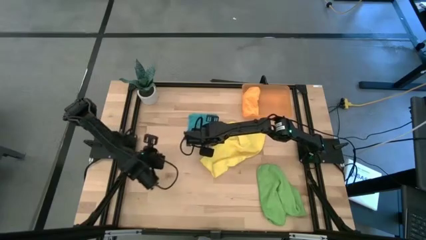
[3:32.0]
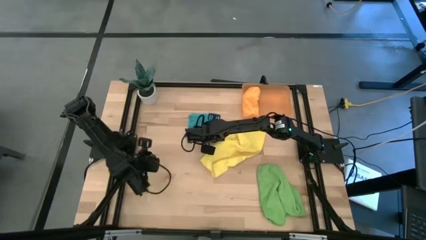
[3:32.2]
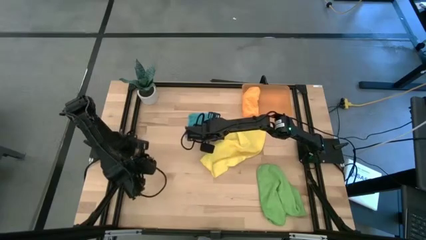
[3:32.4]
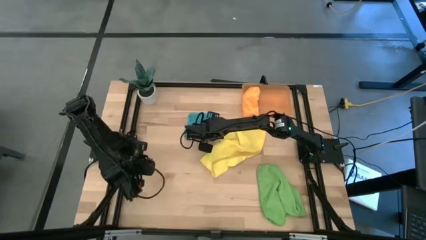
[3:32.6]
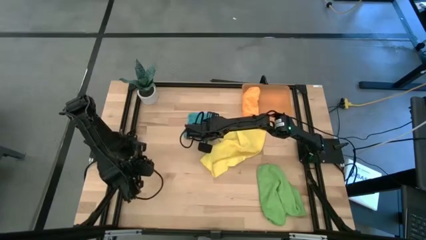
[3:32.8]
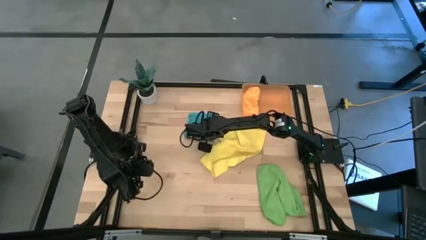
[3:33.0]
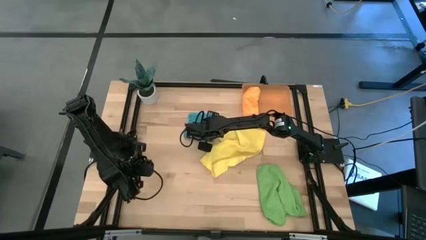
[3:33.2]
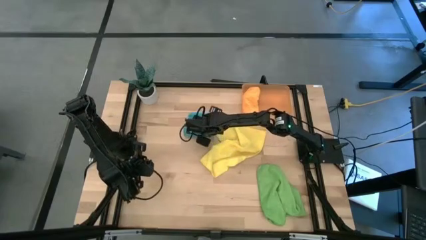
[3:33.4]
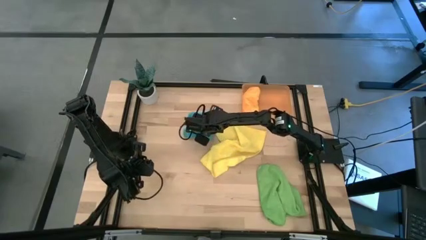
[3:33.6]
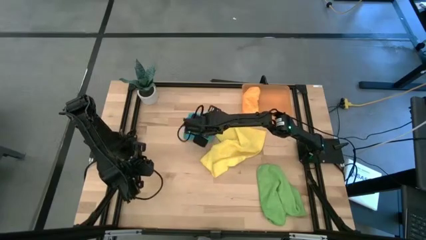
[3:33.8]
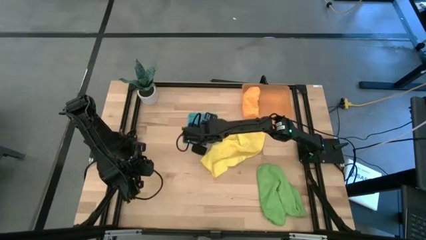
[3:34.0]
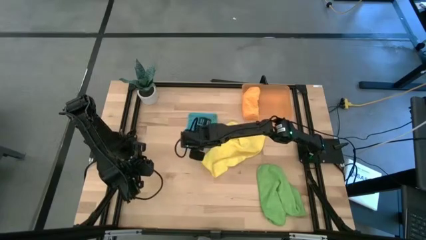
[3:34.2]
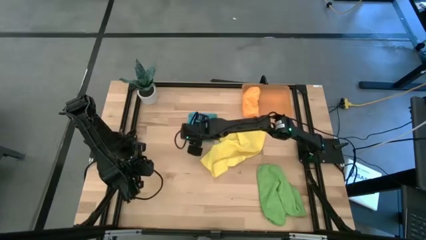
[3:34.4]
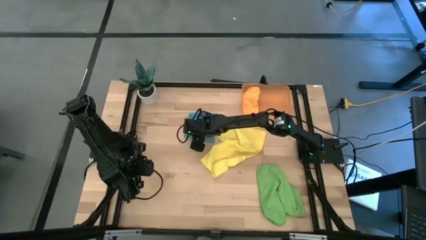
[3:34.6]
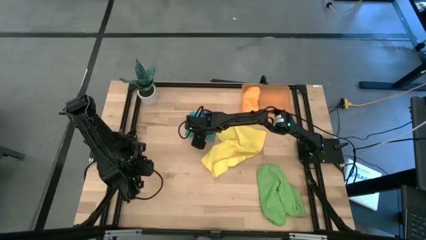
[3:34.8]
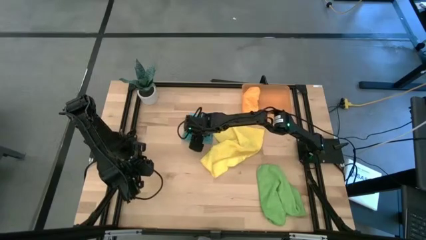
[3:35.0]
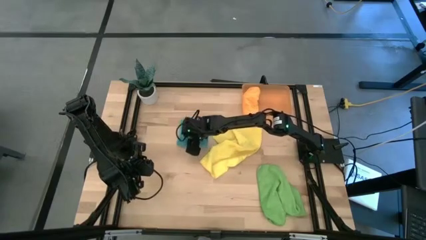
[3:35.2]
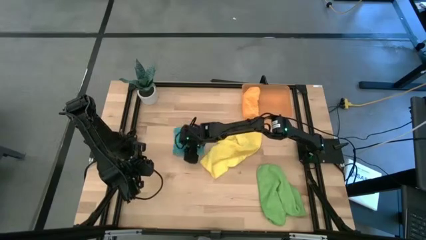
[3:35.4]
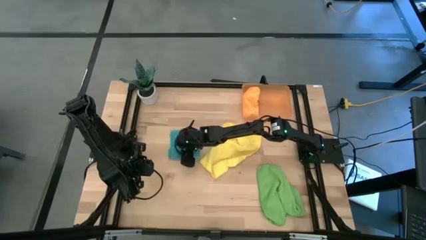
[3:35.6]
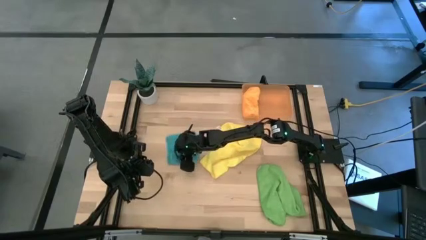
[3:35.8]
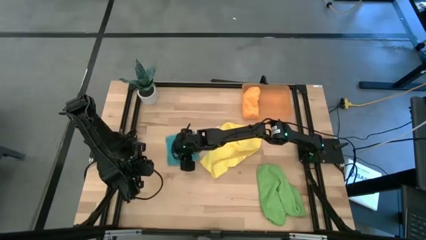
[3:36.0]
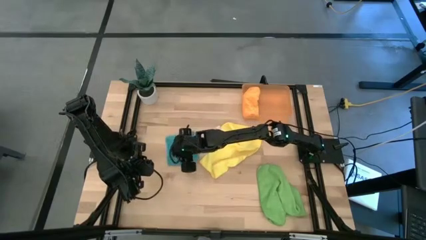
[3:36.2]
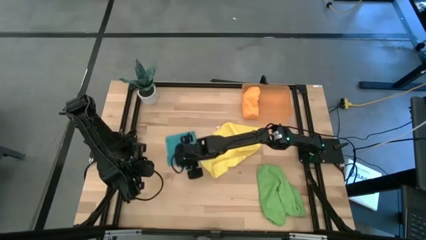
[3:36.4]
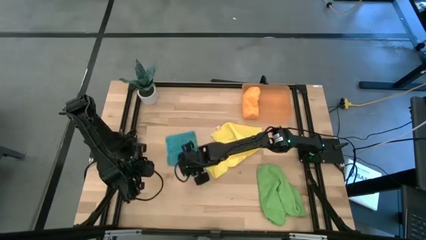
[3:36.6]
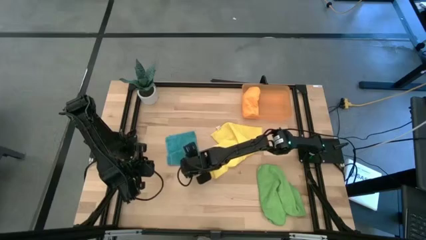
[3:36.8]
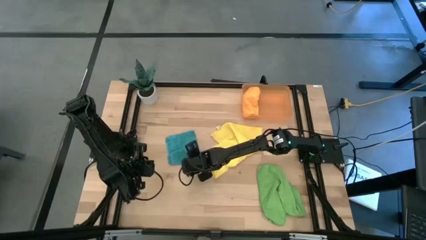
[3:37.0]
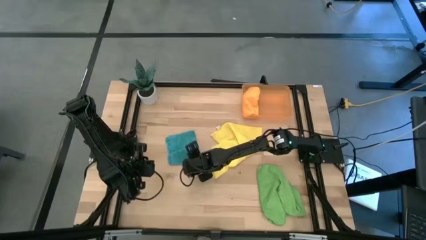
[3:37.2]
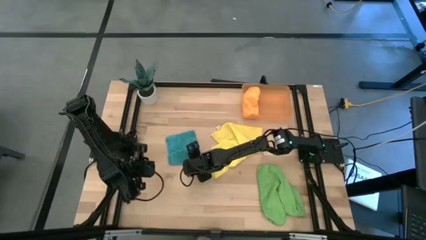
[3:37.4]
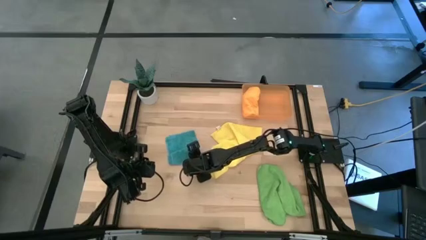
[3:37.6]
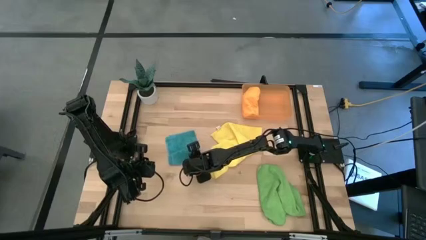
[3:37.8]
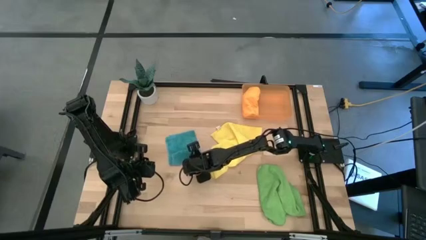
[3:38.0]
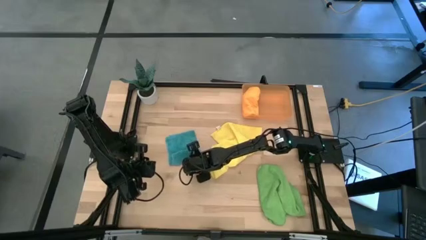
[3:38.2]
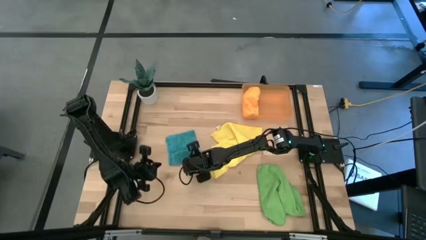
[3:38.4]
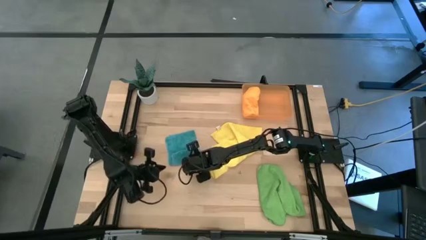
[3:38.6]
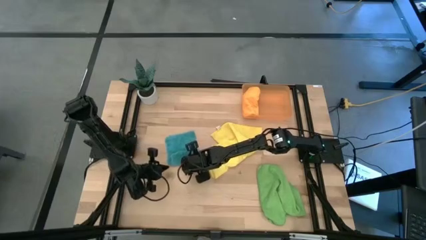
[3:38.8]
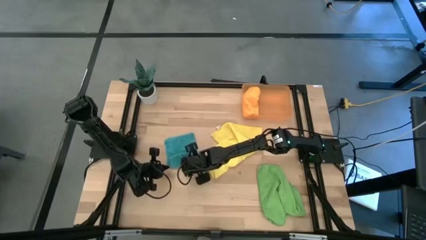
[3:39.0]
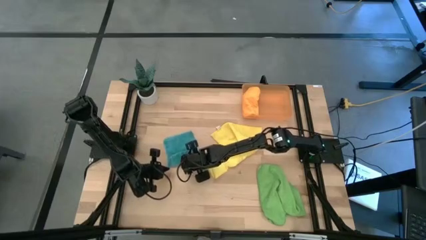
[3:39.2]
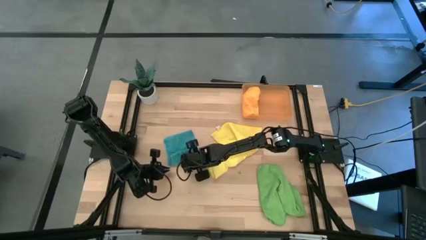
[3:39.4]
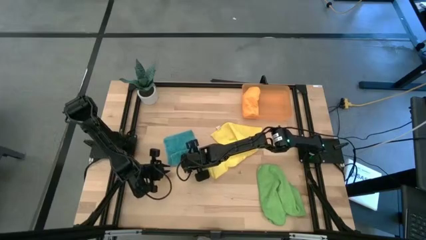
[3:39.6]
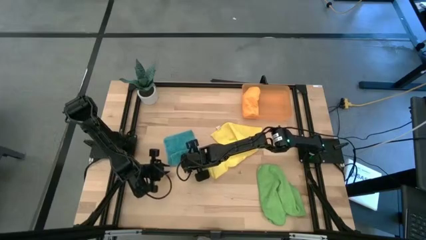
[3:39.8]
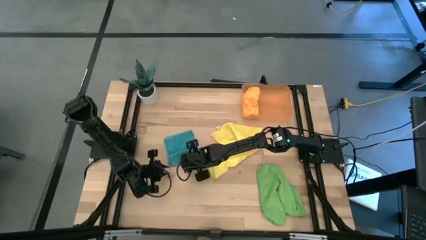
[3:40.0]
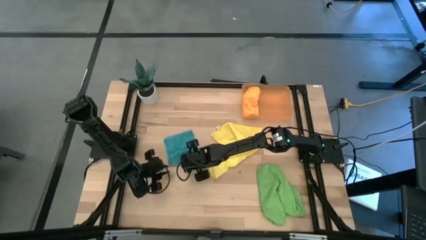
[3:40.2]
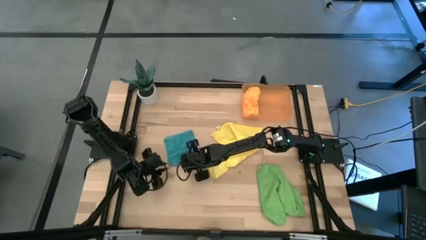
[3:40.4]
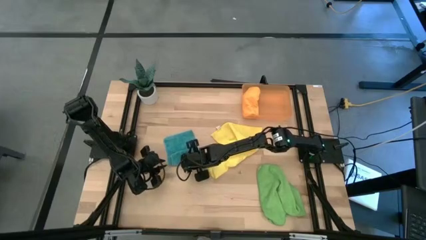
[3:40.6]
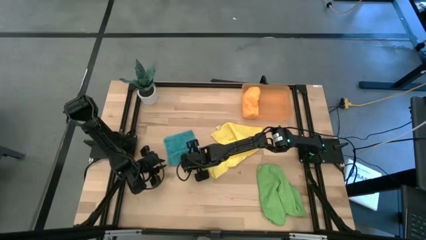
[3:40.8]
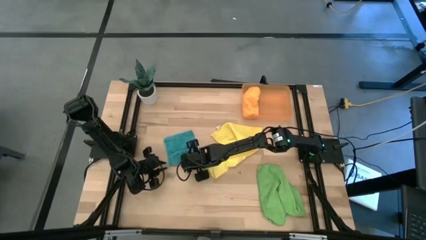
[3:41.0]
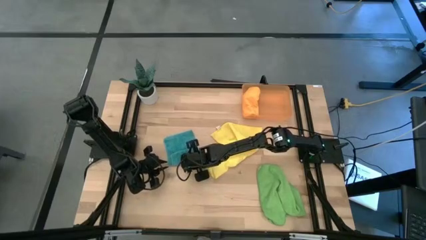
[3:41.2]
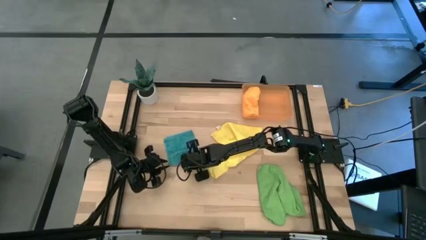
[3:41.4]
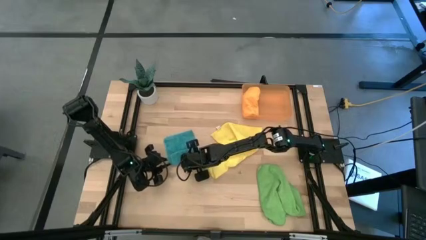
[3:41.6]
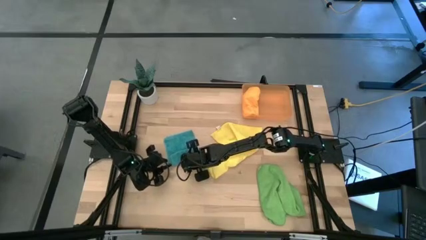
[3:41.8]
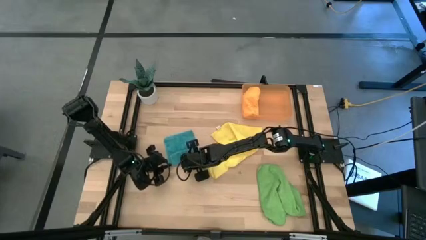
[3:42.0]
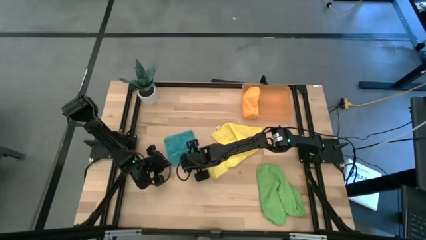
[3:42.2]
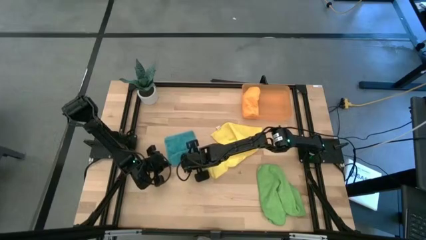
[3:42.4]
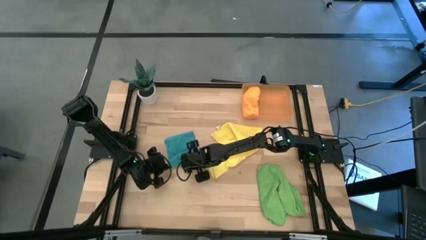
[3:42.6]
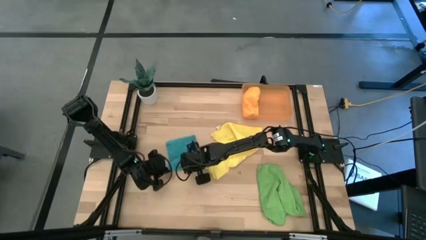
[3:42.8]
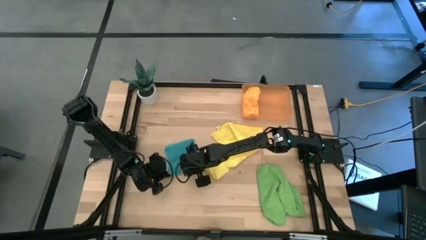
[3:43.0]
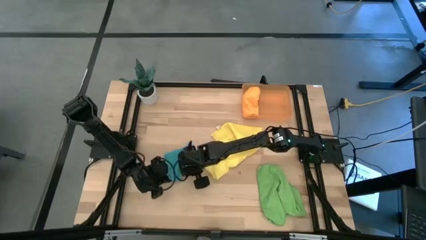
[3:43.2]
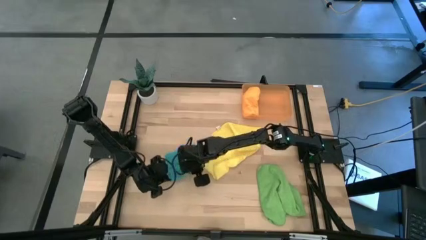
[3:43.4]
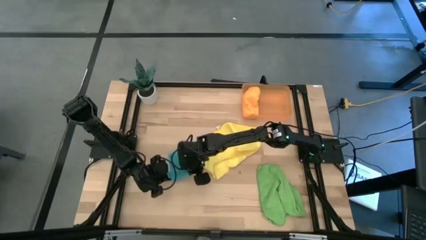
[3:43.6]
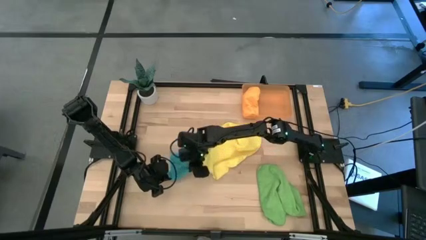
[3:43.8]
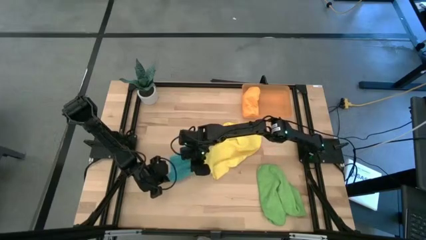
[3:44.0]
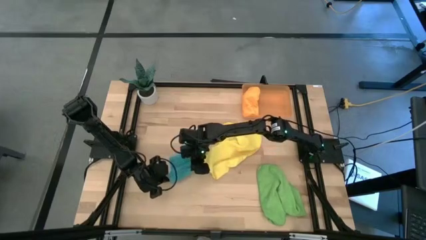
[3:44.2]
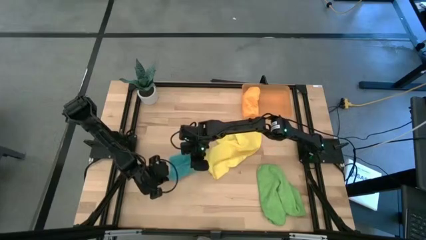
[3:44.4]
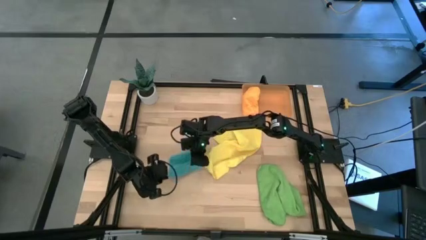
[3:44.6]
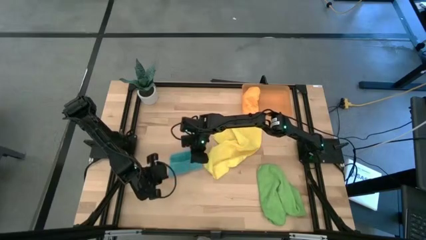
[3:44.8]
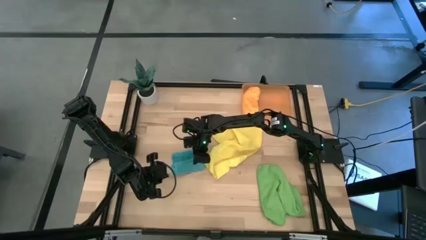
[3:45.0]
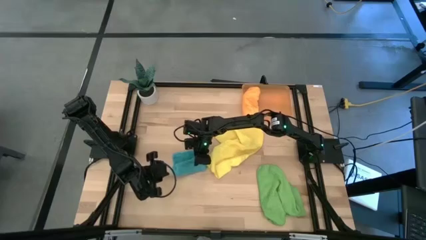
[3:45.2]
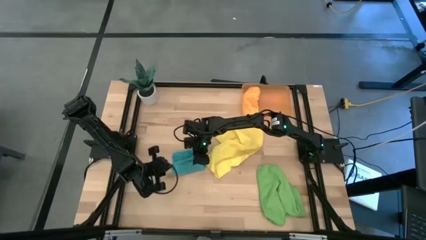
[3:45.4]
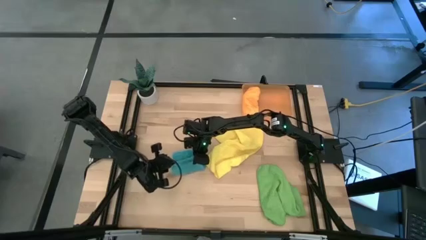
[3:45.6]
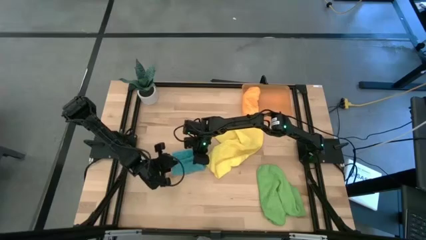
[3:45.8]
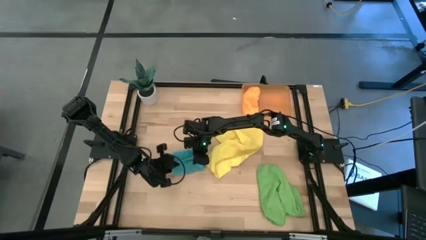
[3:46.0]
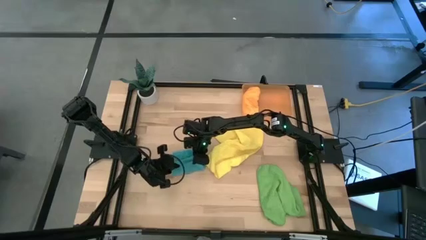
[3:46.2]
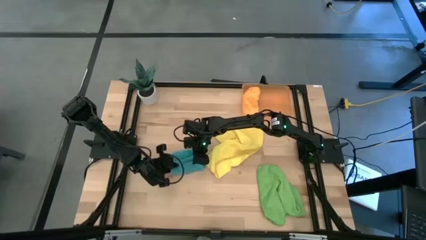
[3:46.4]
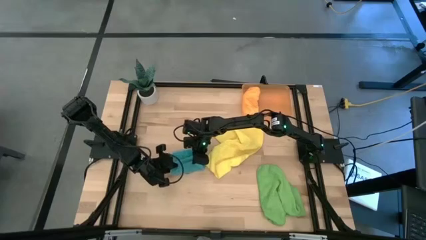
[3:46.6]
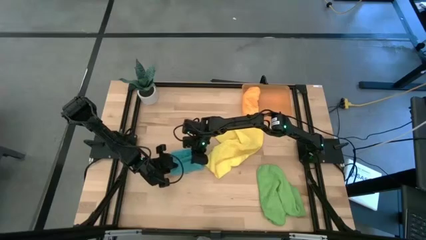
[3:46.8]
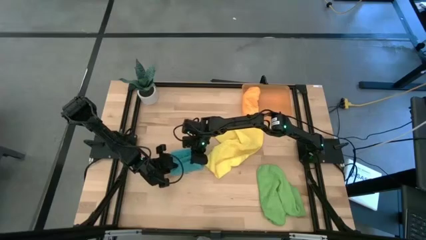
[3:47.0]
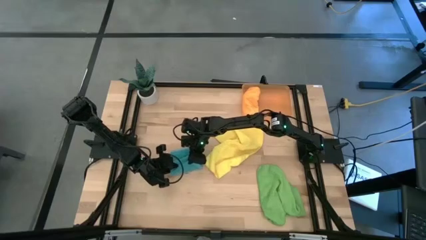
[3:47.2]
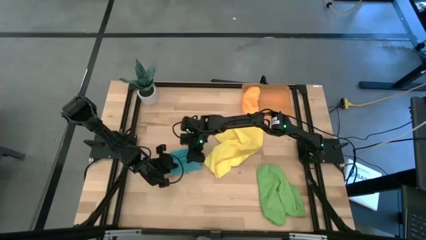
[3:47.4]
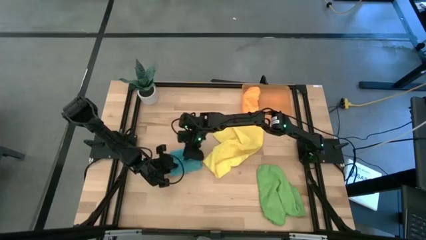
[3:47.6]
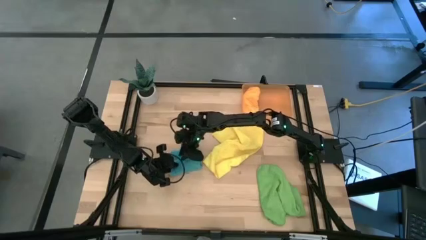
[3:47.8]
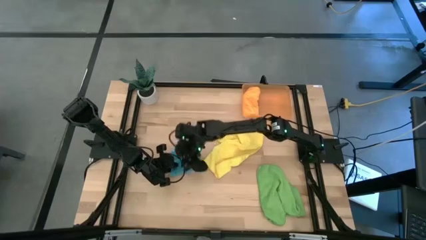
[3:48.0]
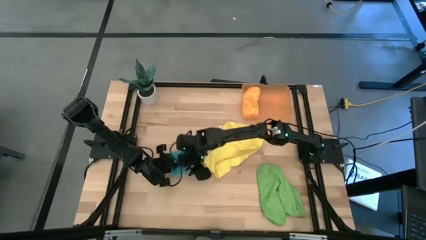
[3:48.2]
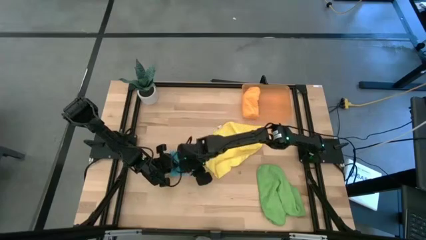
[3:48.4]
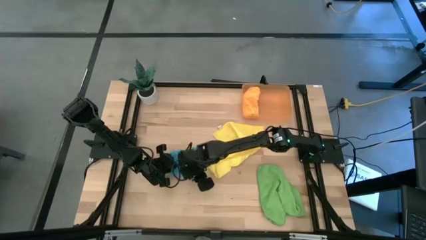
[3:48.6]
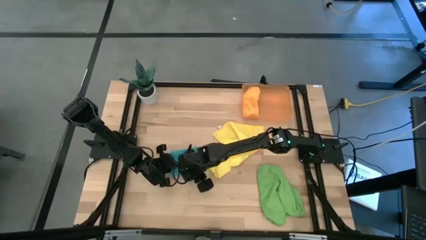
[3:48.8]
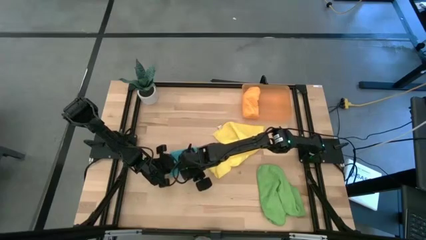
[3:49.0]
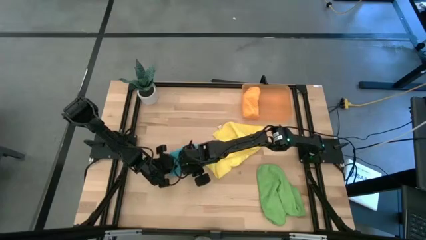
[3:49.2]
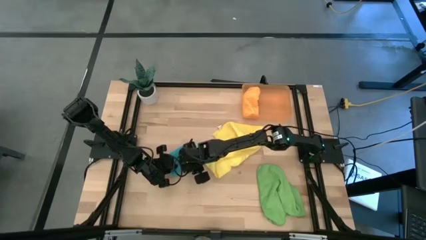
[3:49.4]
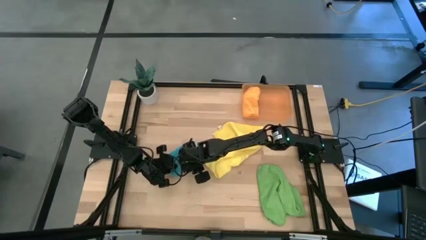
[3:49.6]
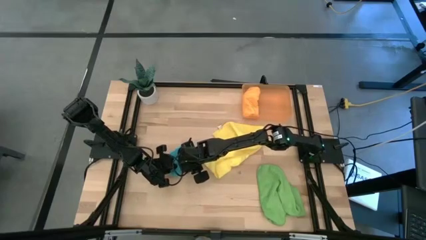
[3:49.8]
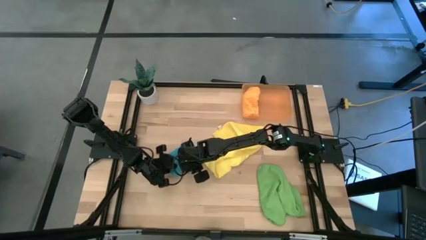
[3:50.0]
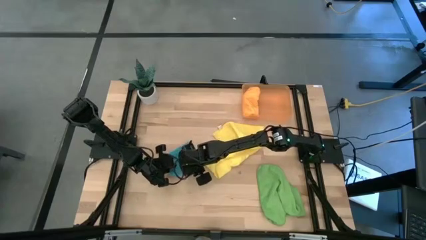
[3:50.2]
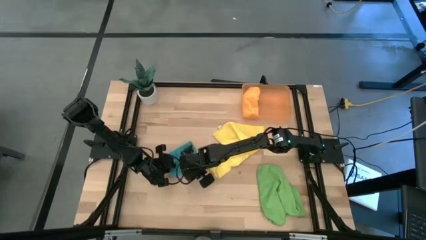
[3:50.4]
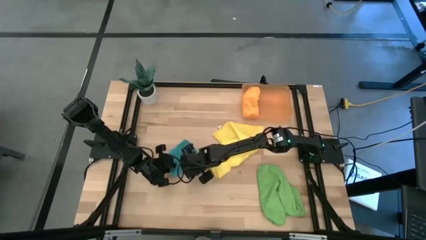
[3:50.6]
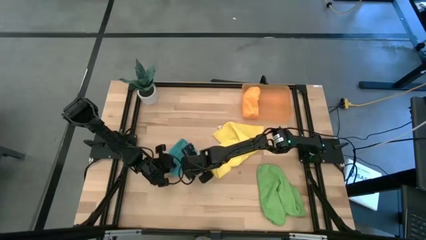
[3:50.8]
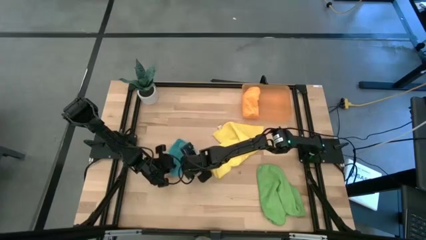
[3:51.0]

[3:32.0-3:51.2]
Task: Roll microfiber towels into tight, uniform cylinder then place into a basket
Roll the blue microfiber towel
